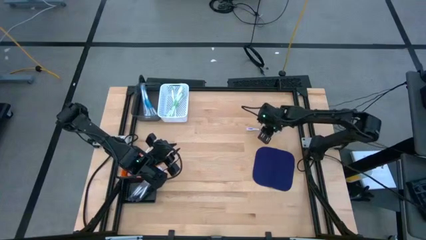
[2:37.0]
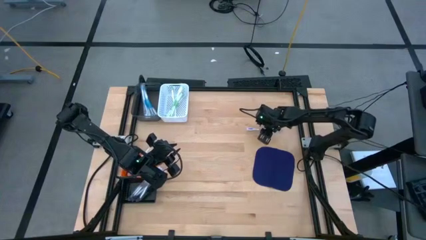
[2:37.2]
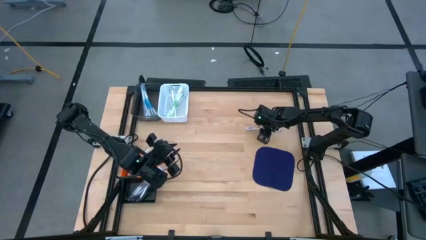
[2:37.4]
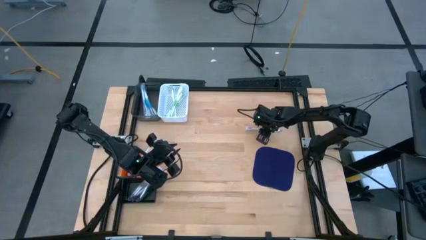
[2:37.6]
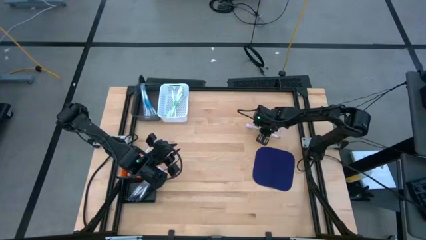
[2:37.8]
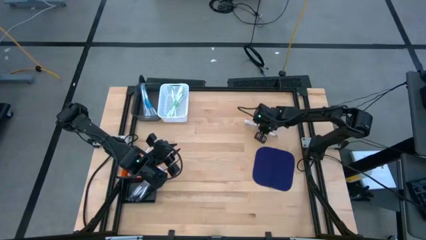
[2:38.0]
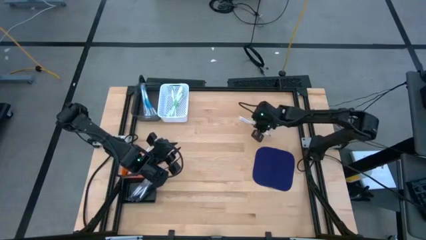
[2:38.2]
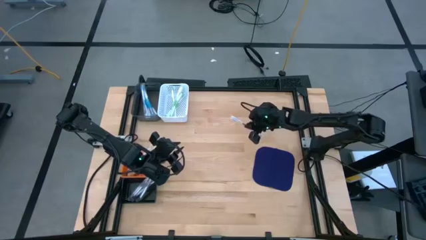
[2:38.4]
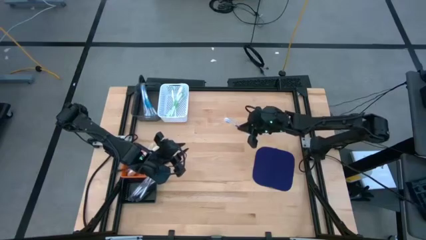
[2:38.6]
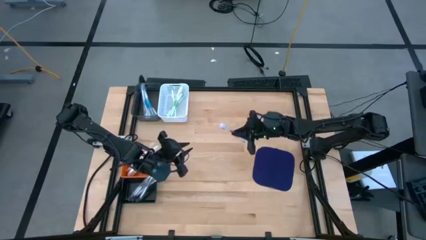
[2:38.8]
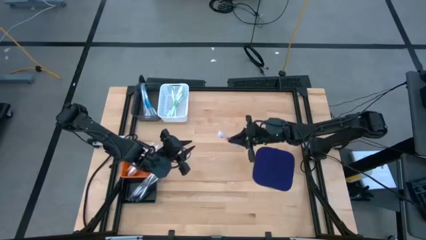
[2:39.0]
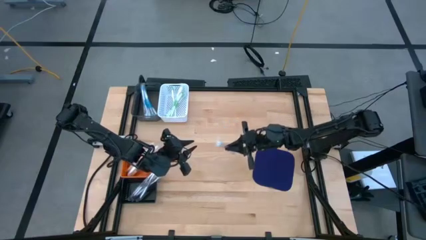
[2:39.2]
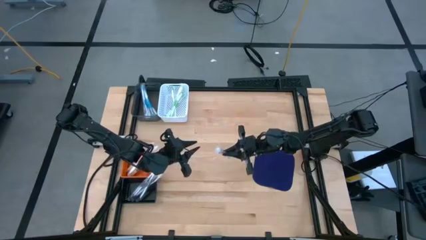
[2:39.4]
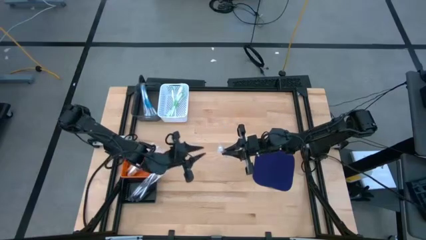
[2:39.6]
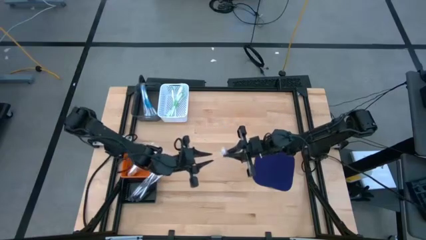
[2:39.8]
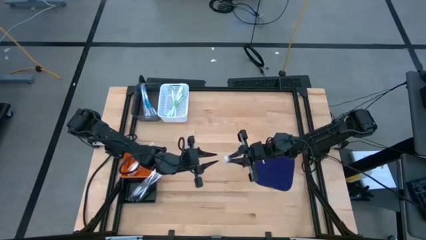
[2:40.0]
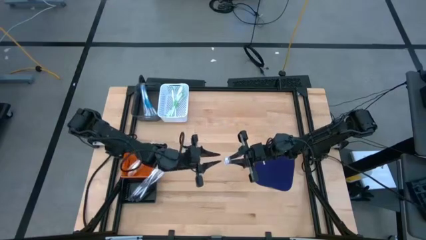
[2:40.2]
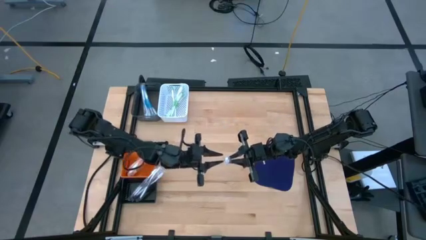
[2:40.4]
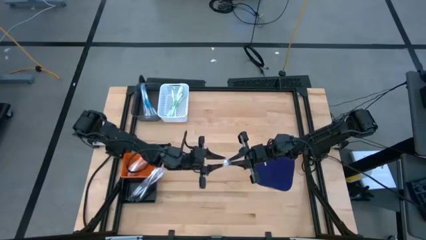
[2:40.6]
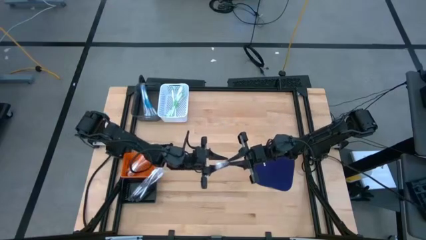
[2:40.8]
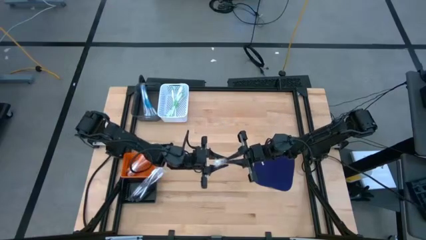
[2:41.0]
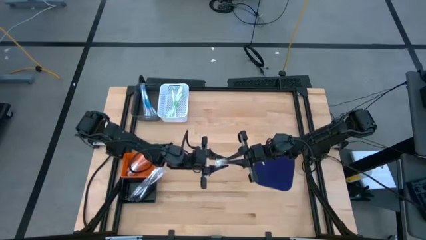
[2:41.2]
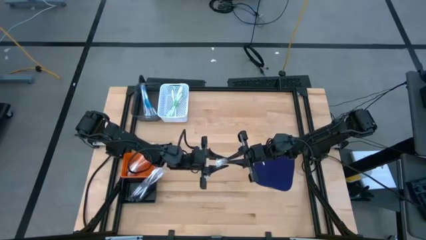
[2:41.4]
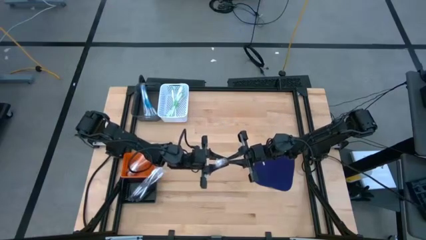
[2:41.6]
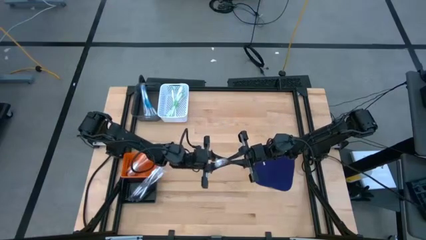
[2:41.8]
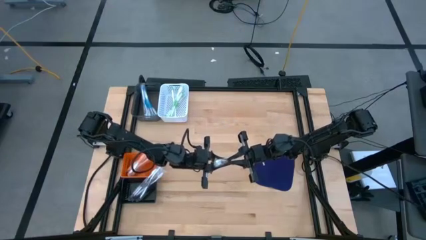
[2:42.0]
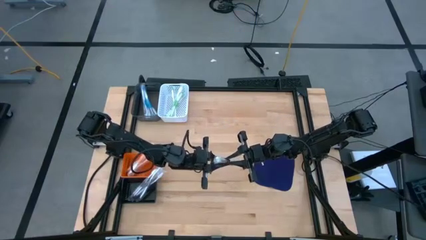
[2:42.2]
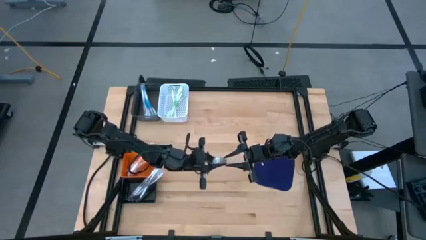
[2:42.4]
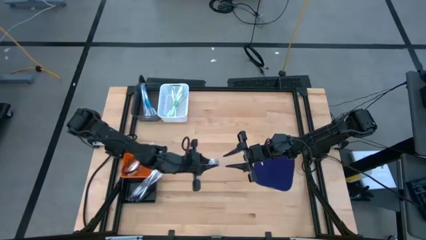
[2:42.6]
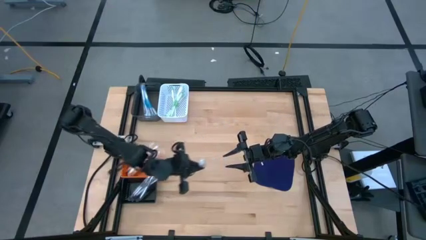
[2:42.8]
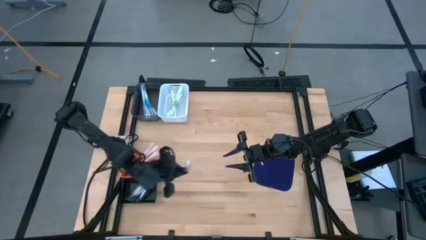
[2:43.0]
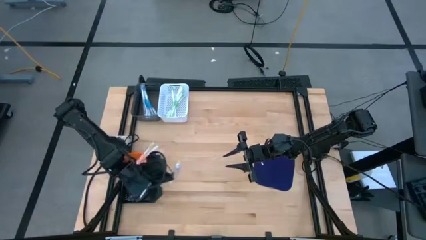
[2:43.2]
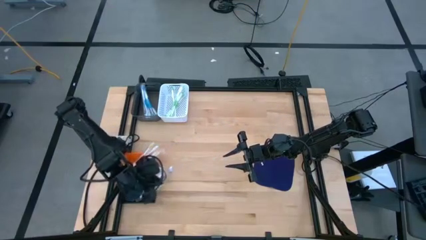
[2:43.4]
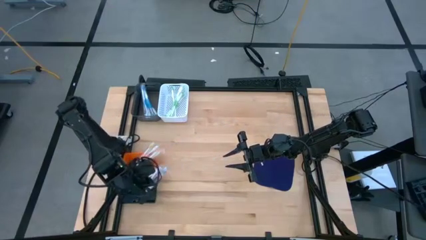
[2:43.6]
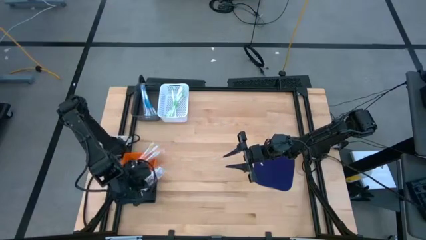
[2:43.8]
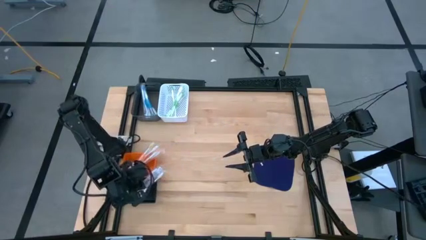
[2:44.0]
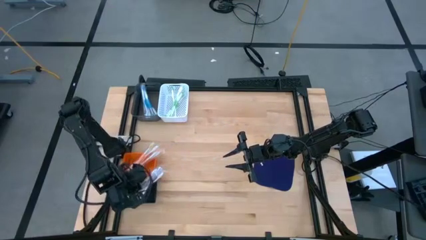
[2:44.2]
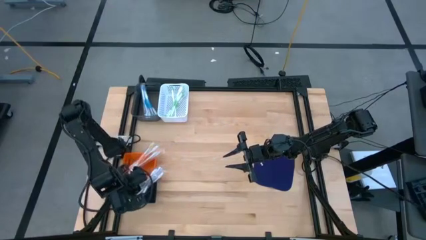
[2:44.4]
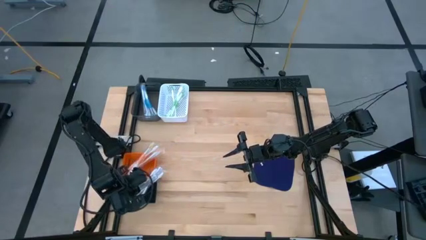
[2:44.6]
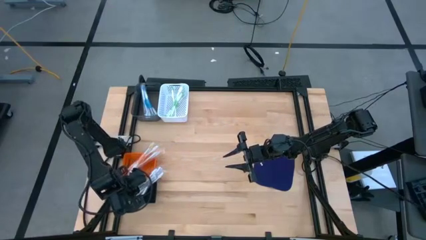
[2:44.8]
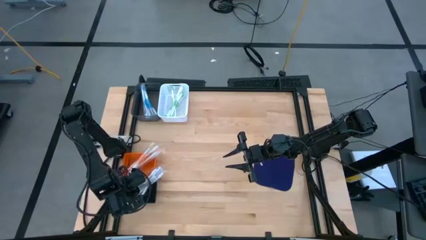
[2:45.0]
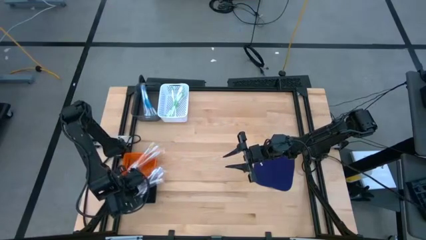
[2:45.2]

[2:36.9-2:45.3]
Task: Pick & Place Toothbrushes
Put the violet toothbrush into the black bin

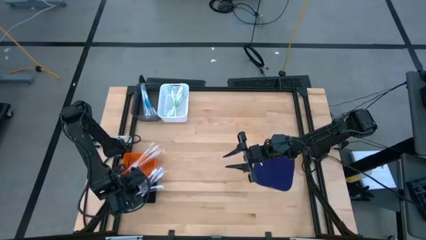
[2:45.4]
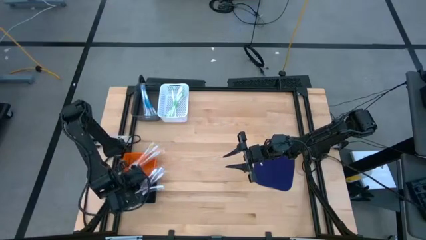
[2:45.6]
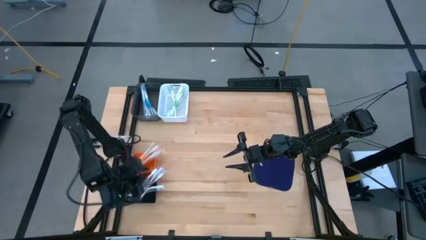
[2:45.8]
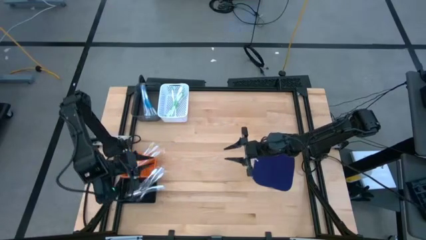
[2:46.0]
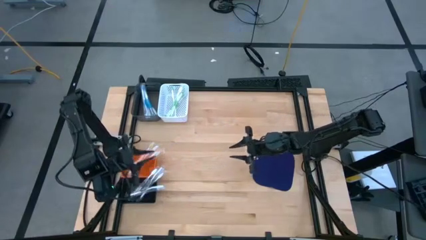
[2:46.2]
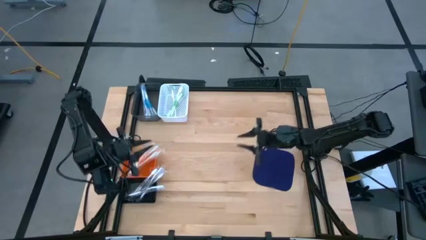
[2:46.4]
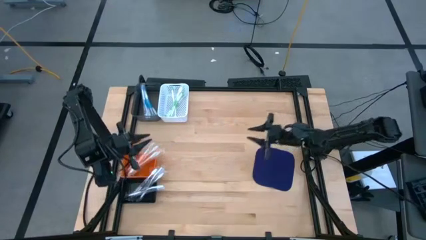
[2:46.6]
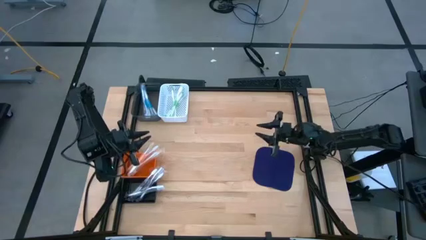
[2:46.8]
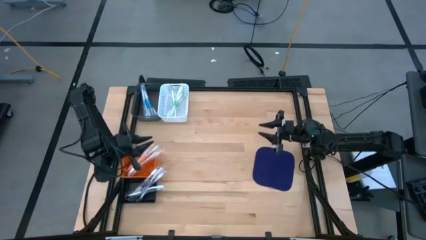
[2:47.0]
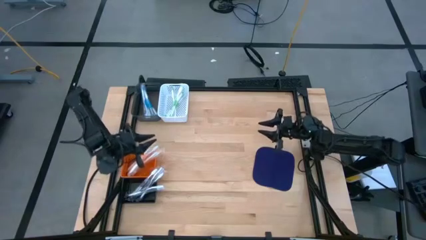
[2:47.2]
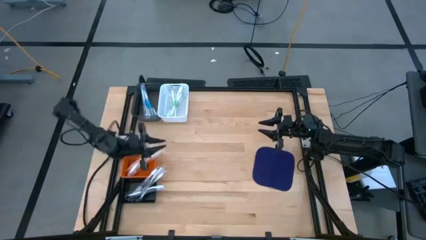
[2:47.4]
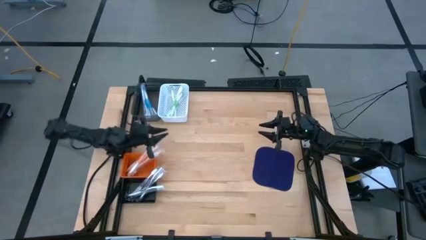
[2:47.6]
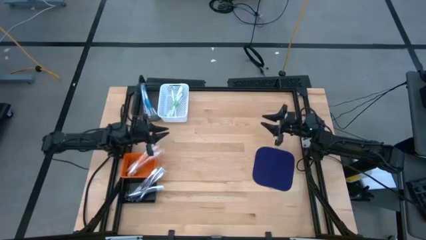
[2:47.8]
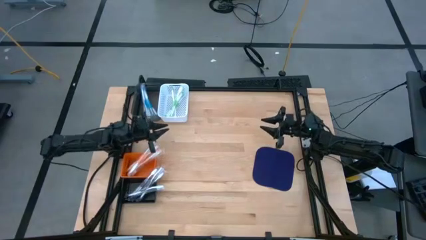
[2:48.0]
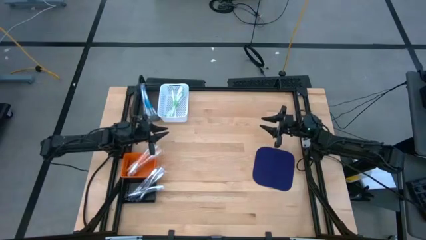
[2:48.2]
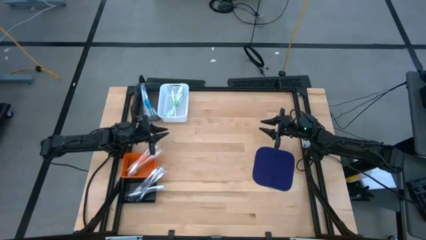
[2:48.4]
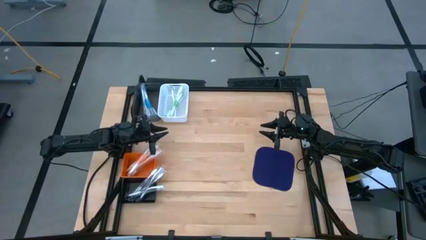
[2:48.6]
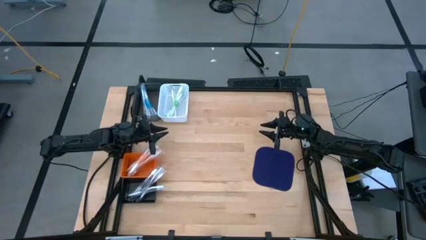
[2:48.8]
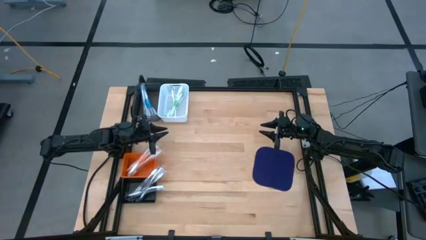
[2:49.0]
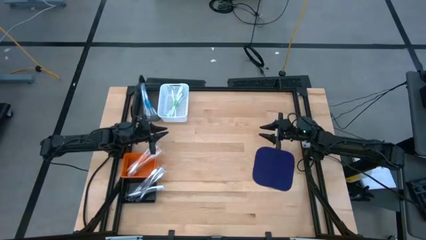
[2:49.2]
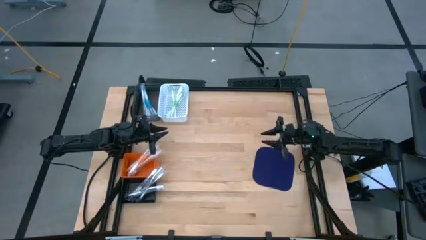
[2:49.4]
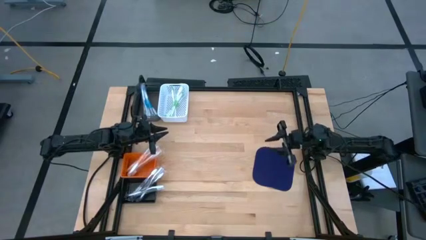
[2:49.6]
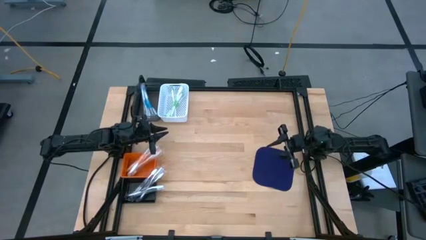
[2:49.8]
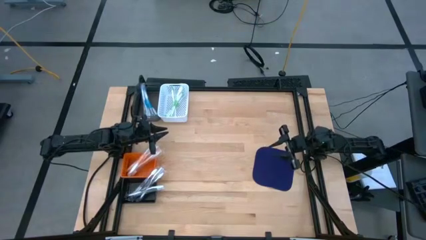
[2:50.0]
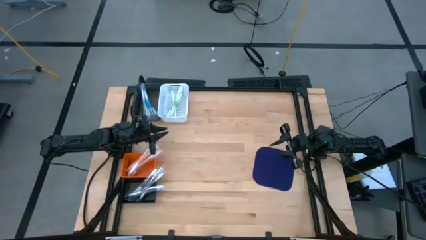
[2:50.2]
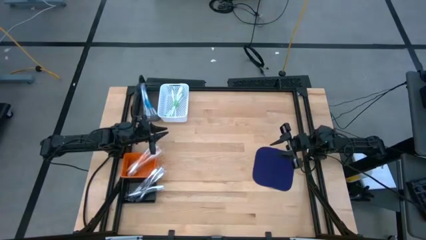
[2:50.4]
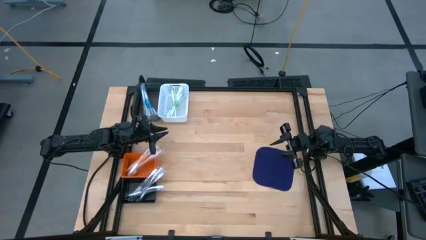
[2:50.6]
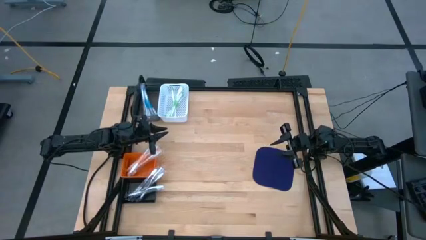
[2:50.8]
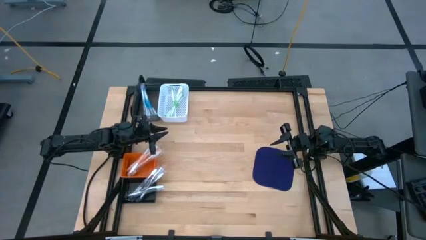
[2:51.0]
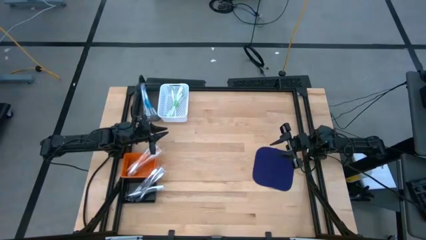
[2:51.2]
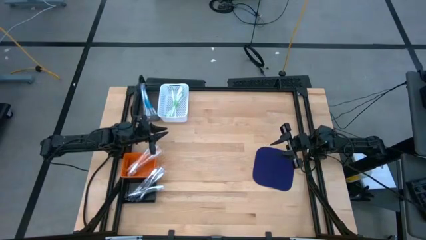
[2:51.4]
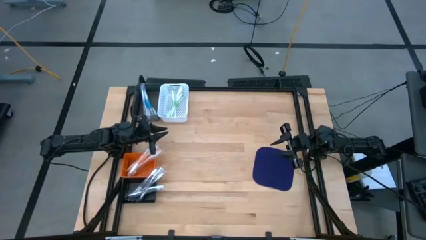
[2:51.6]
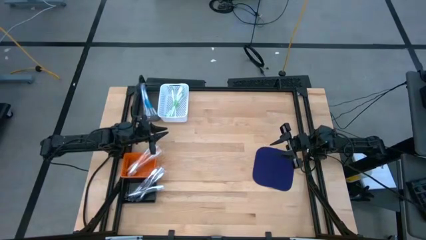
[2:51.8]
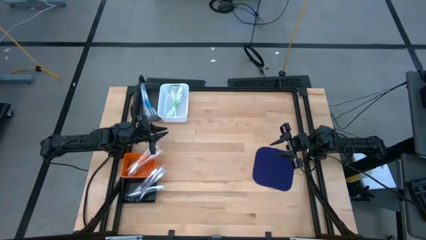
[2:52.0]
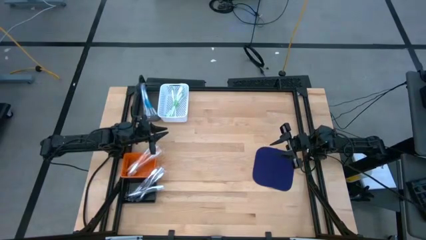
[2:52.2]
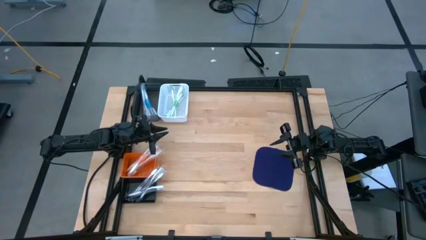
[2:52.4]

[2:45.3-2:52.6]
Return to Home Position

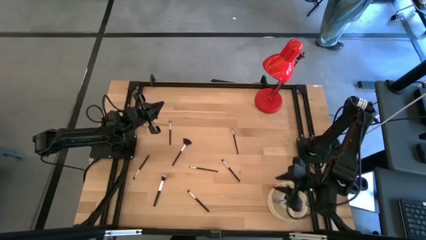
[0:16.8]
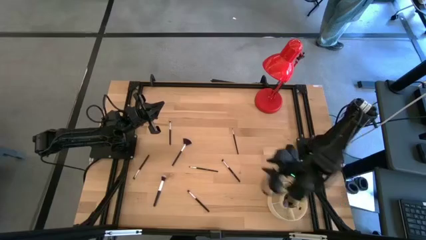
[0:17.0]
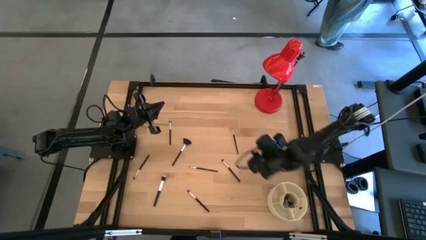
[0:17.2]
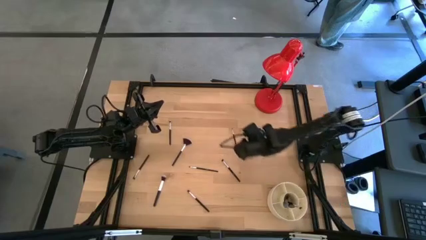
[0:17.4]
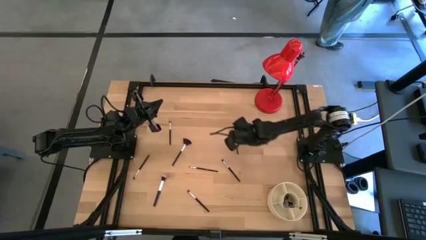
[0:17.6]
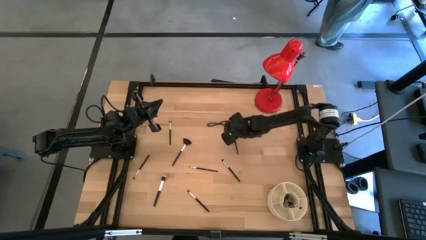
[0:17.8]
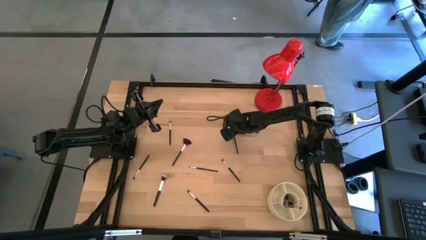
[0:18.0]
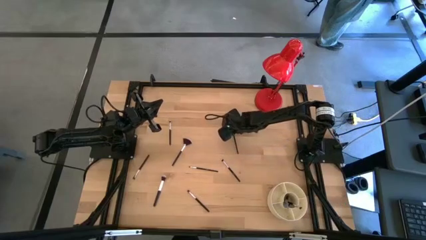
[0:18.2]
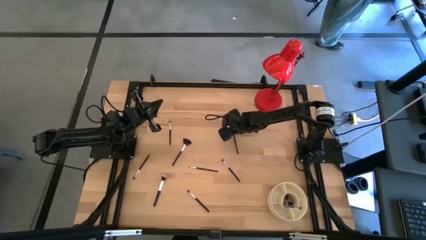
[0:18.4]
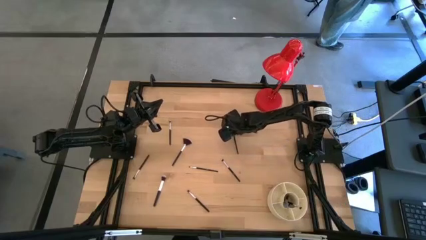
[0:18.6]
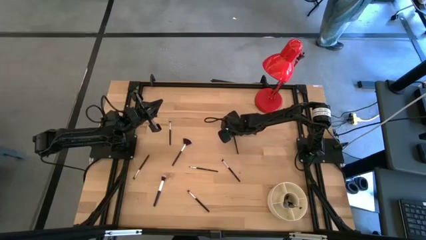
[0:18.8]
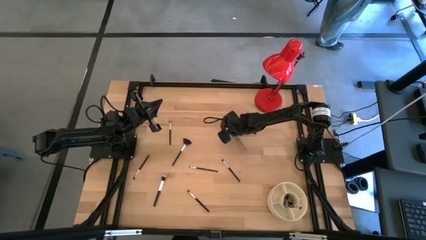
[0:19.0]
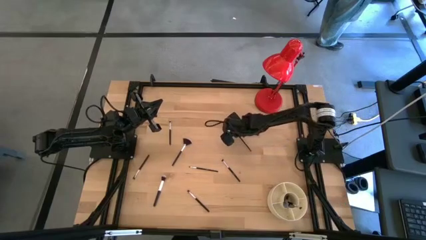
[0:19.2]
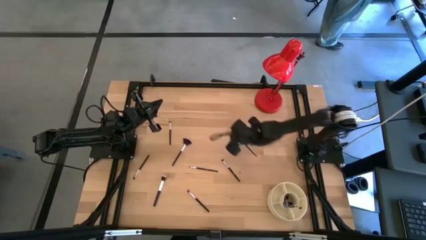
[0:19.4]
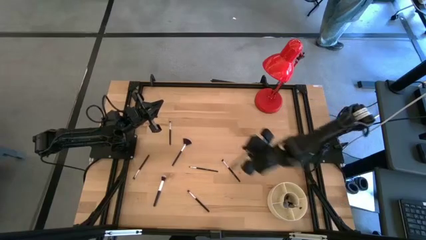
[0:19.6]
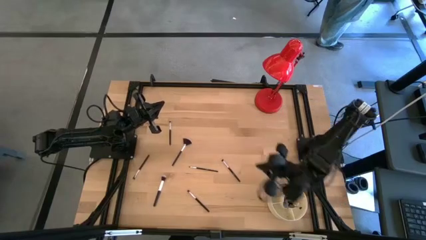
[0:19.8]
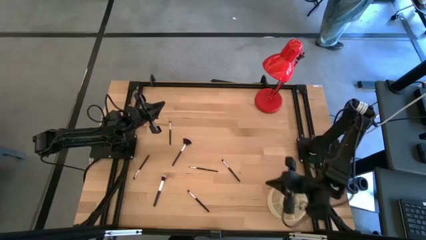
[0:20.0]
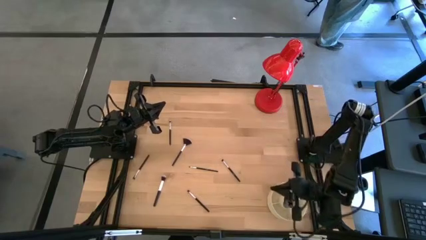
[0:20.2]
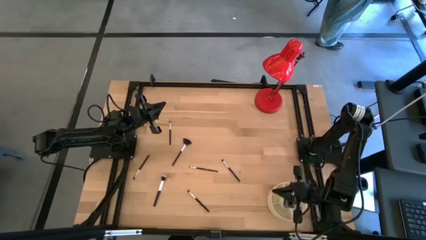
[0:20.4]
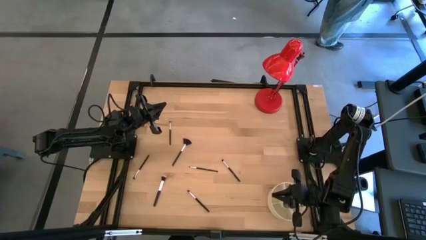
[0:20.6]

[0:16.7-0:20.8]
Task: Put items in baskets/containers
Put the black liner brush into the yellow pen organizer
